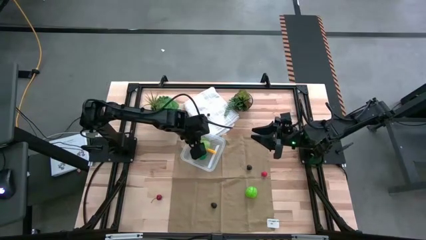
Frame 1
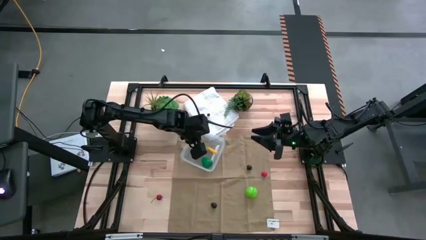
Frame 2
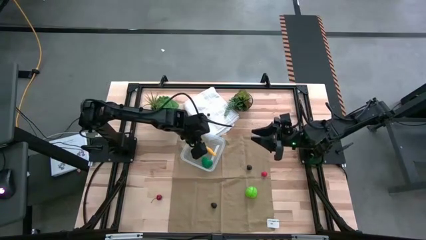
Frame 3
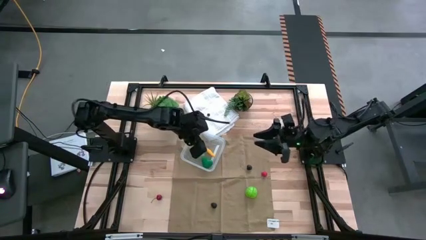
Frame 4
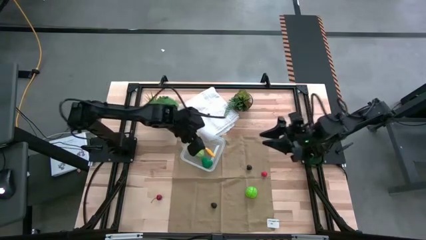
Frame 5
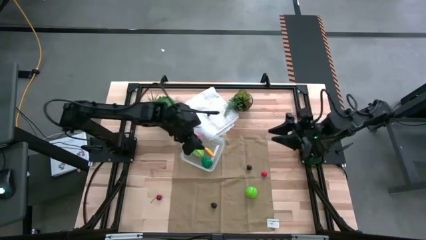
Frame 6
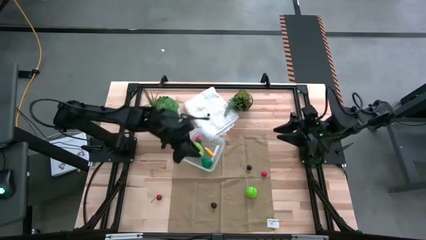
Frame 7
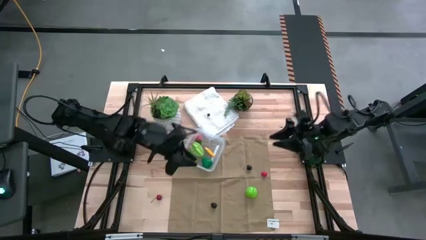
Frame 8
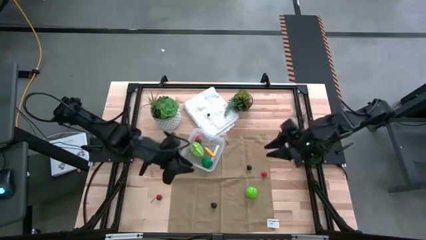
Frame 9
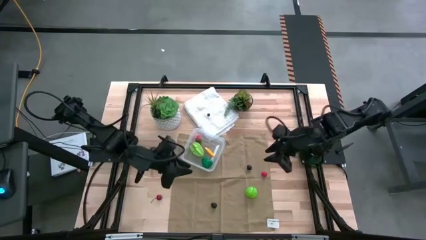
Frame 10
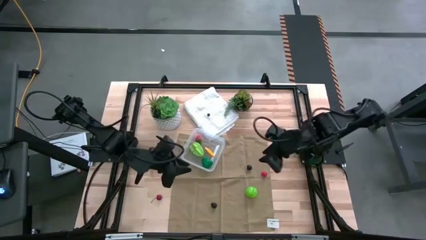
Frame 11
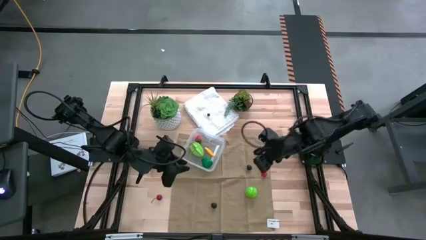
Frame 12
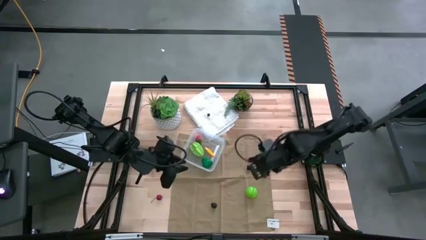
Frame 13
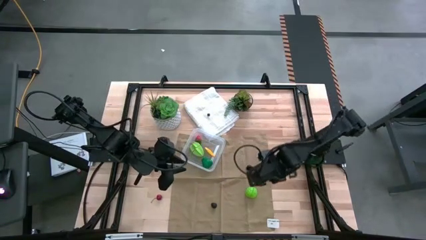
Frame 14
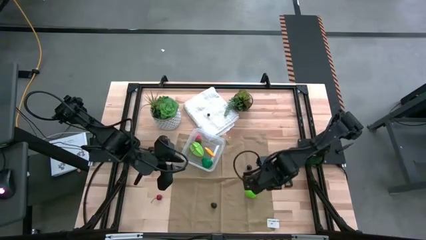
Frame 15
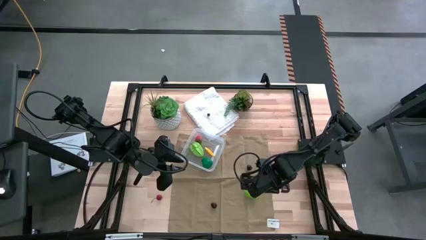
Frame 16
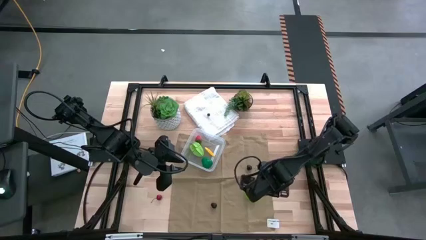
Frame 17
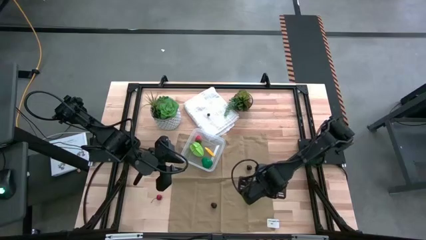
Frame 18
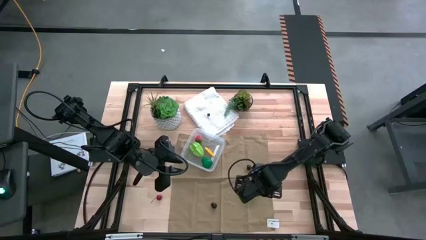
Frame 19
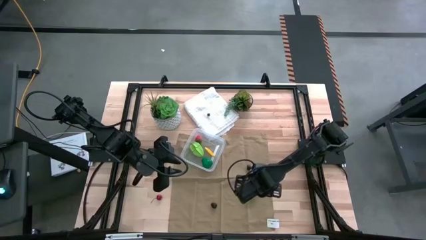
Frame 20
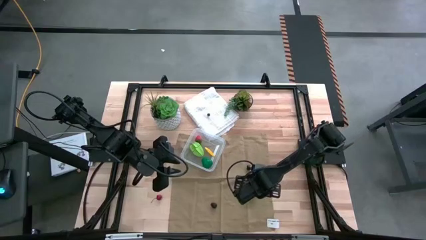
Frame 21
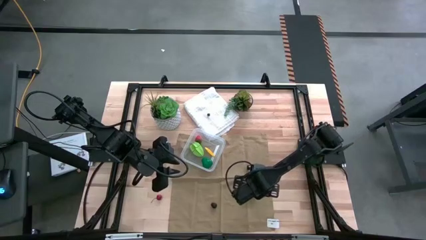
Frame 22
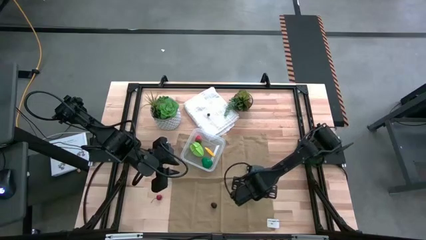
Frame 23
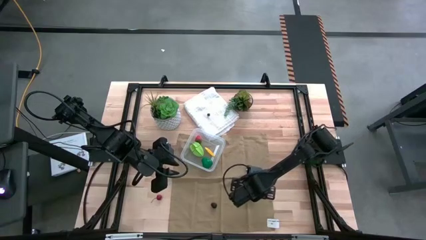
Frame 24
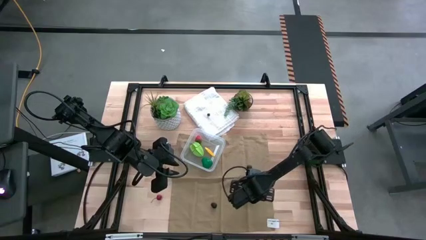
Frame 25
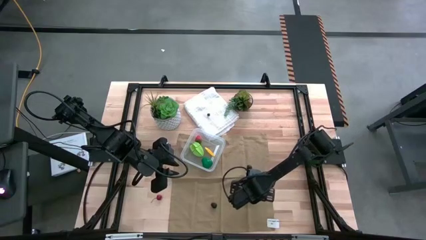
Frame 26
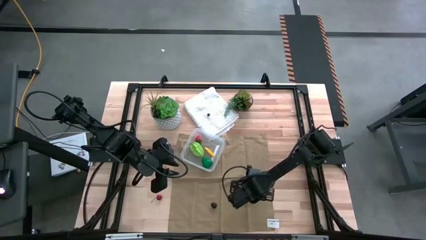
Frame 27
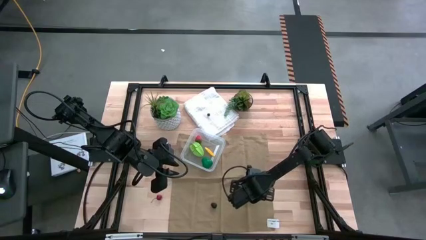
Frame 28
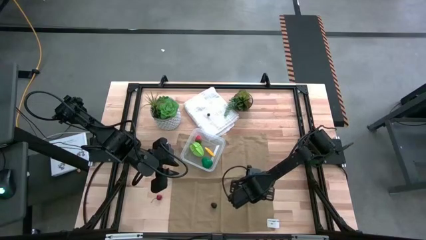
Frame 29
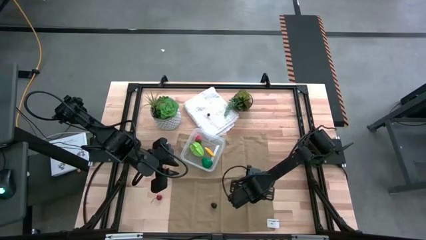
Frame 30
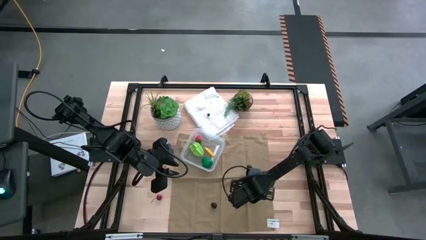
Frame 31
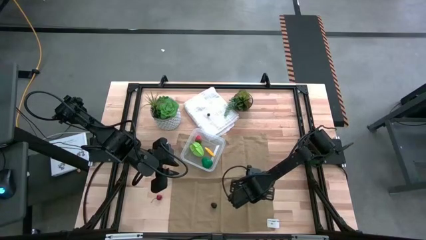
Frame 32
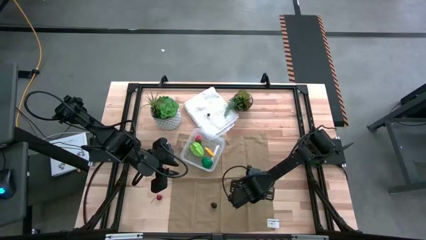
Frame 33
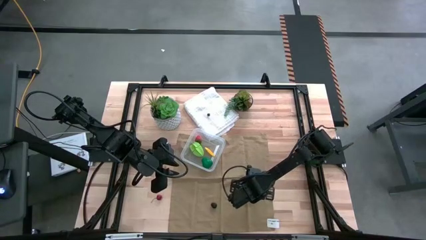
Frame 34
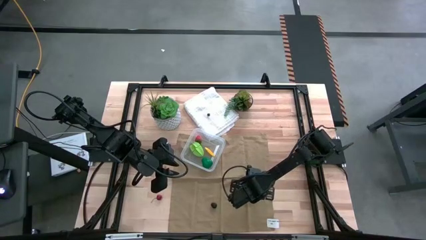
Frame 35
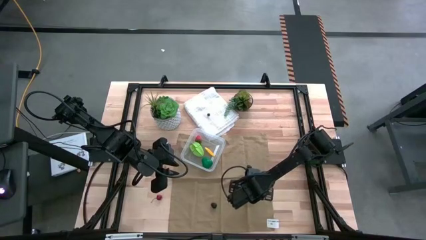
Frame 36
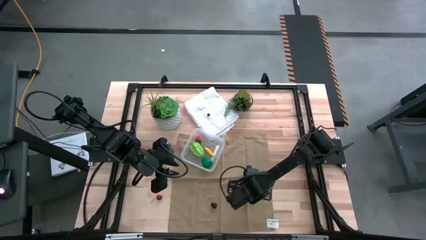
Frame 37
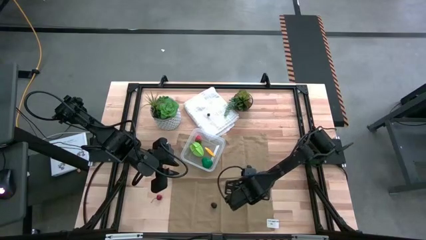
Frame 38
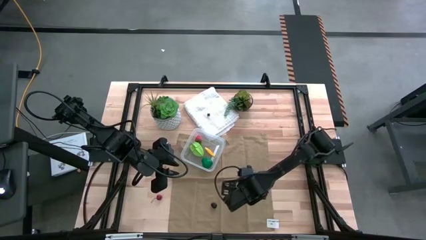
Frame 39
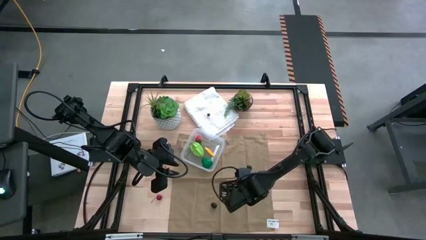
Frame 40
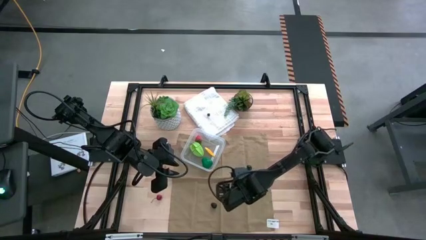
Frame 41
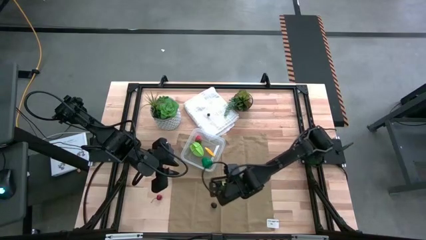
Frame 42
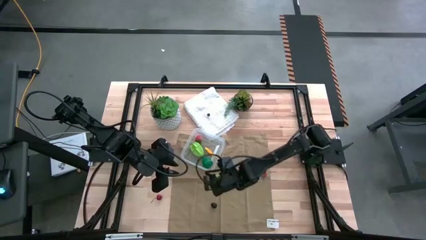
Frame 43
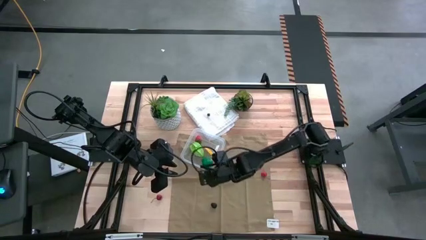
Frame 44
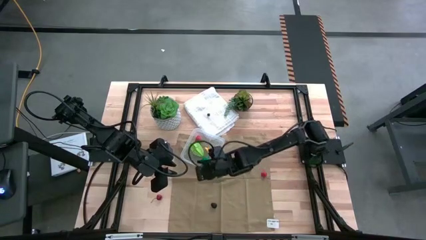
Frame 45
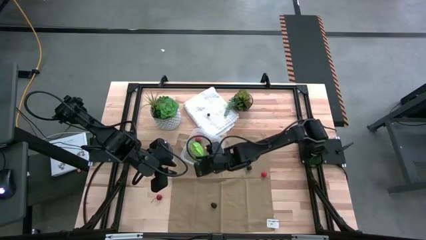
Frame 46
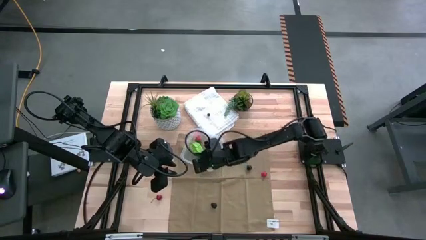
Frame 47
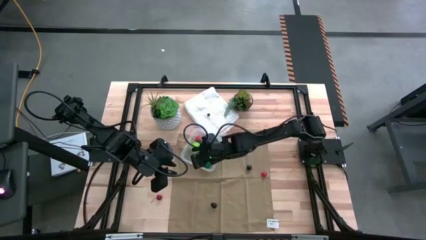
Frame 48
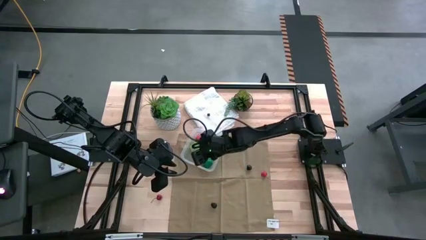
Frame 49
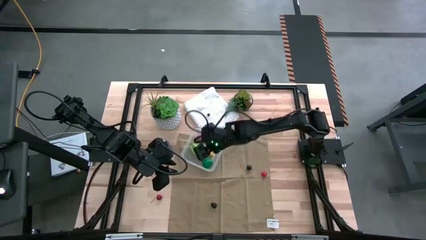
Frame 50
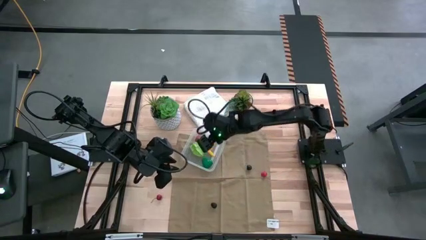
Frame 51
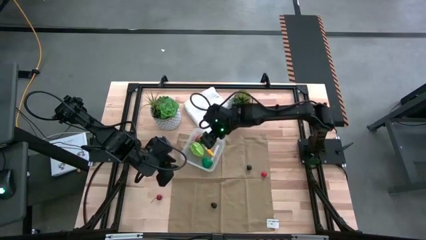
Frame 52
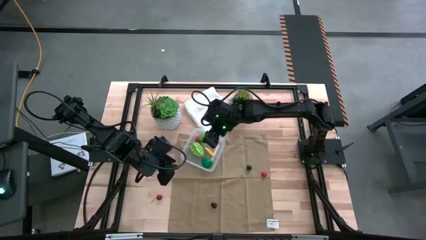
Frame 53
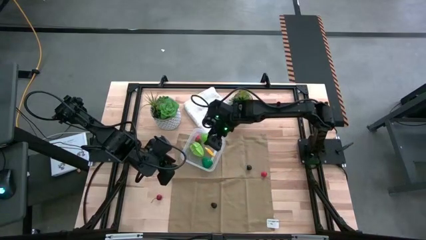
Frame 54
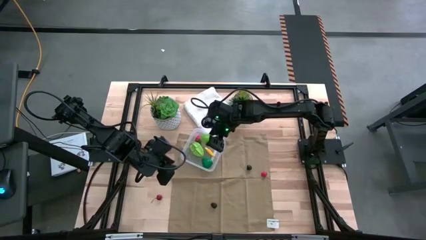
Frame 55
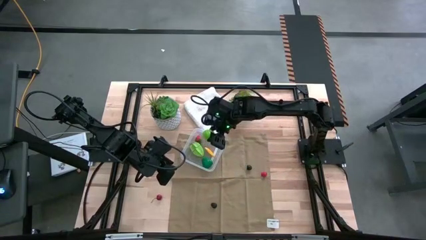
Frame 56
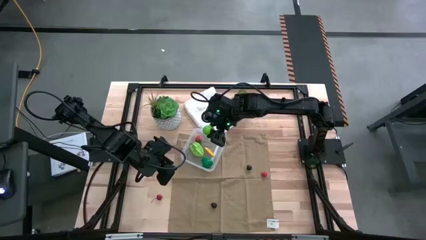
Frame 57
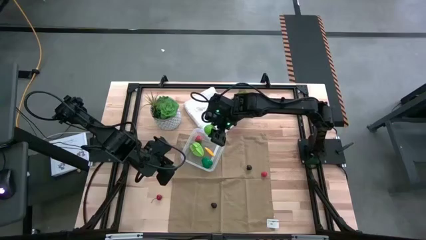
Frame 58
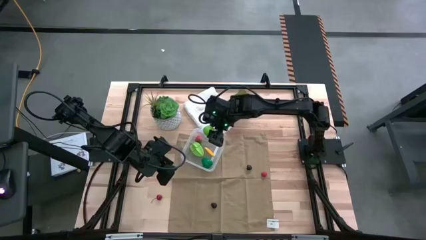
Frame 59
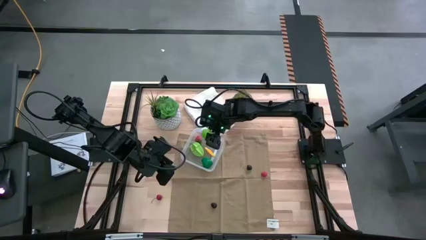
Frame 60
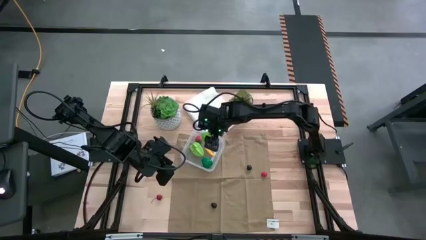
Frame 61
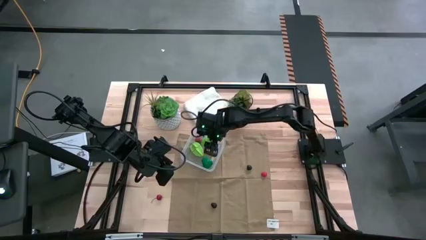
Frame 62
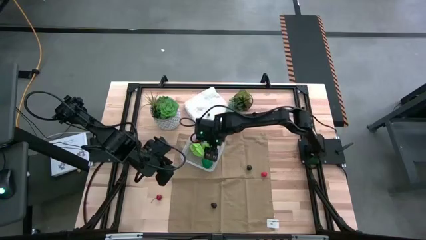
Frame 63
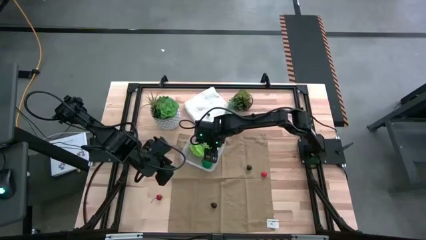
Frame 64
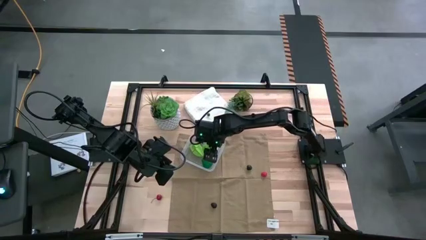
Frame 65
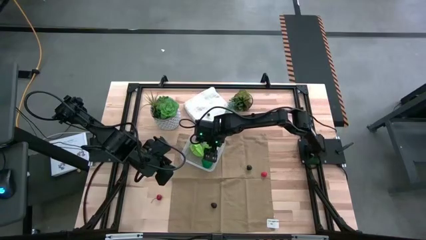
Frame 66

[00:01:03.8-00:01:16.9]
Task: Pick and placing Produce into tupperware
Put the green cabbage into transparent bin
